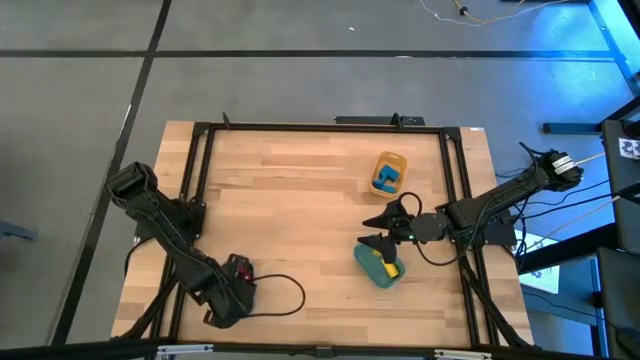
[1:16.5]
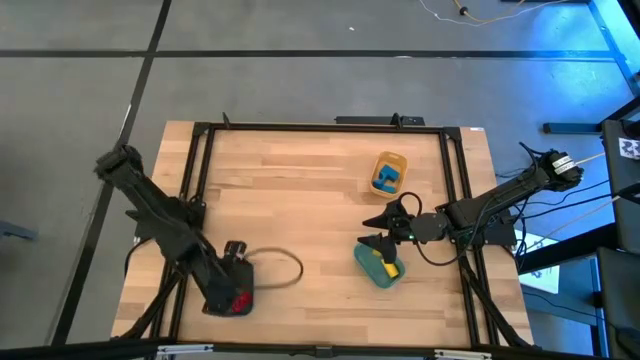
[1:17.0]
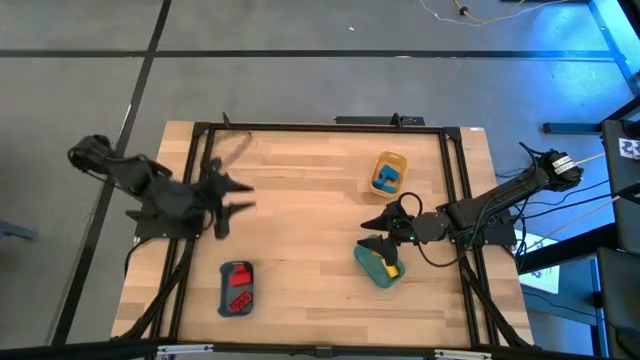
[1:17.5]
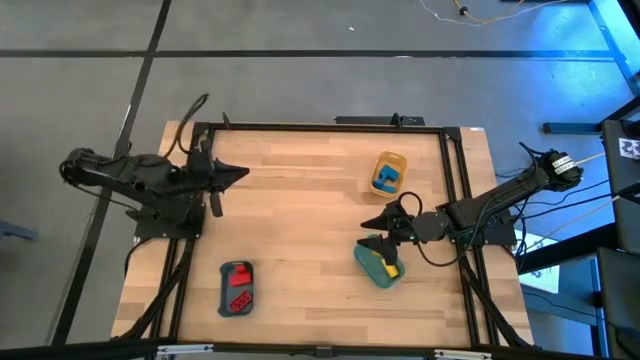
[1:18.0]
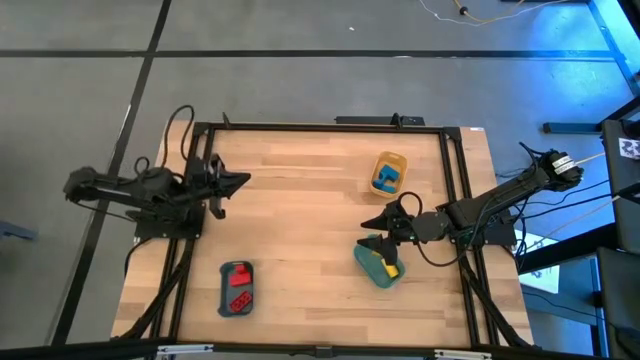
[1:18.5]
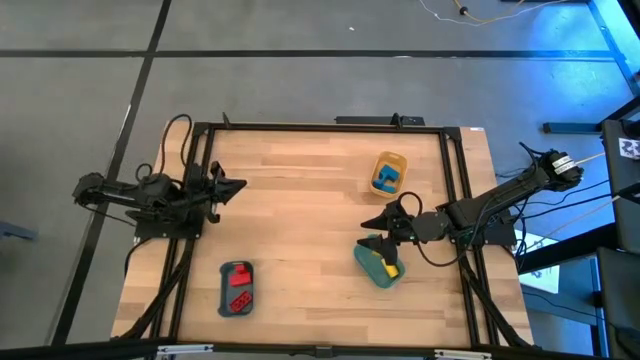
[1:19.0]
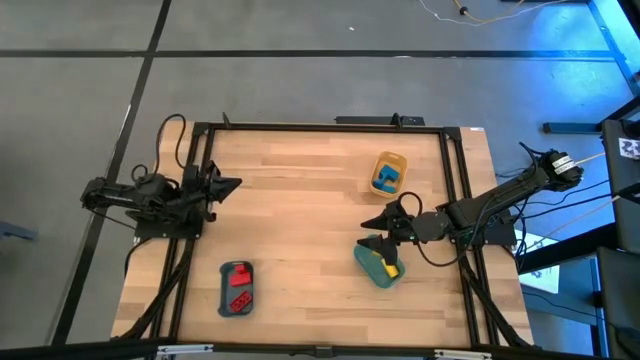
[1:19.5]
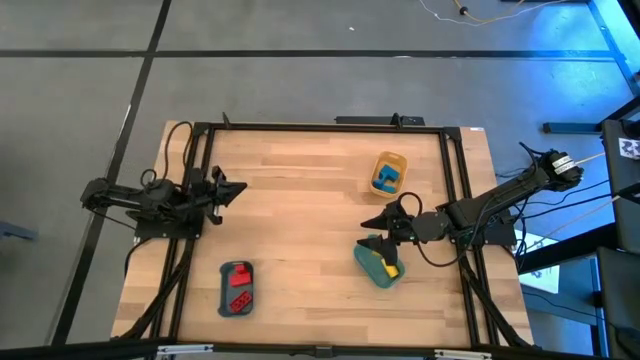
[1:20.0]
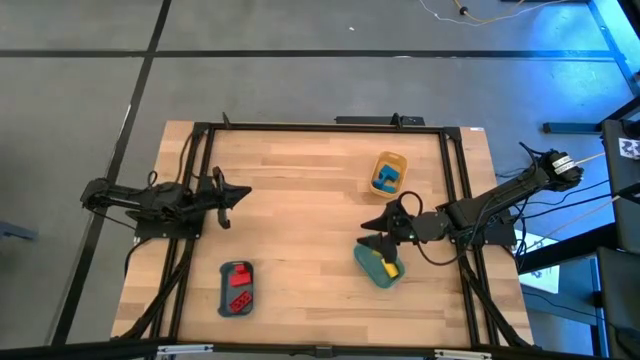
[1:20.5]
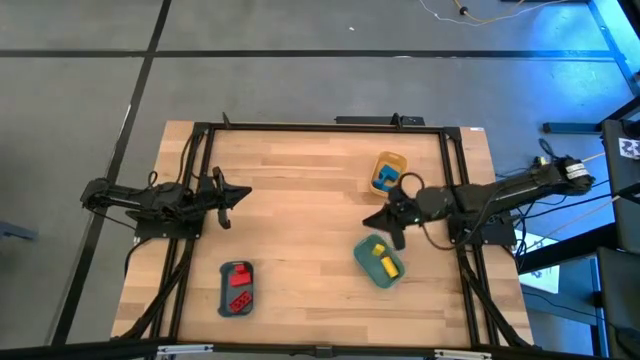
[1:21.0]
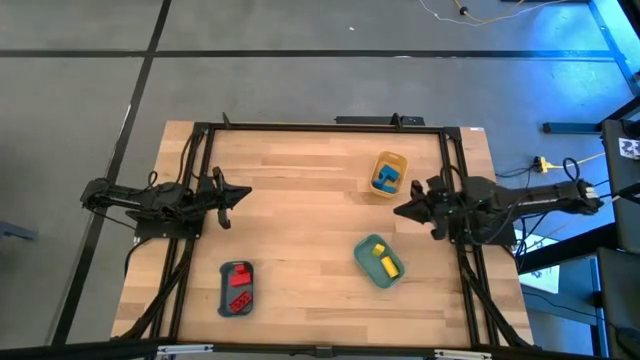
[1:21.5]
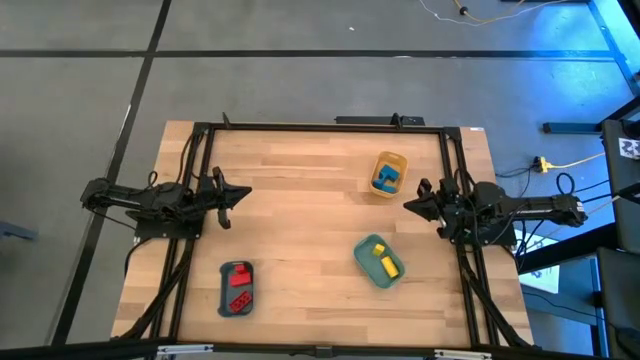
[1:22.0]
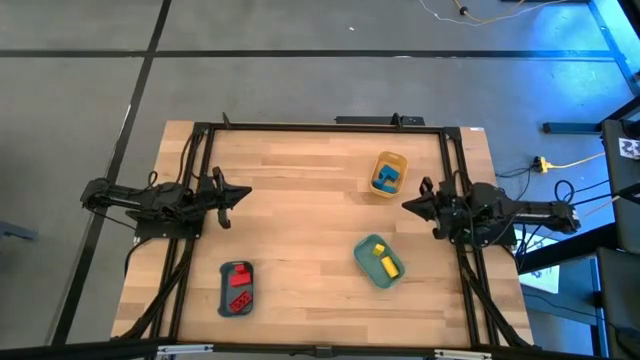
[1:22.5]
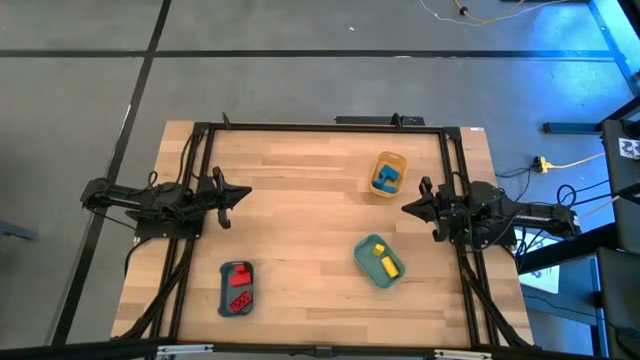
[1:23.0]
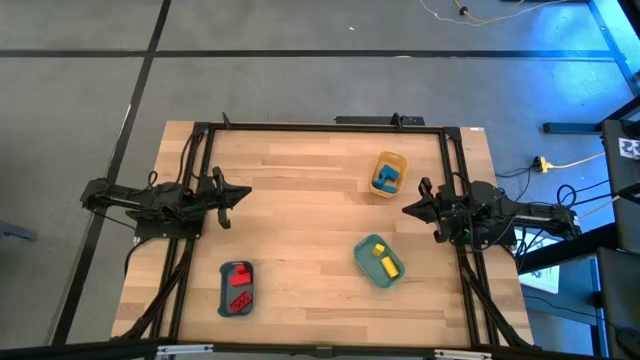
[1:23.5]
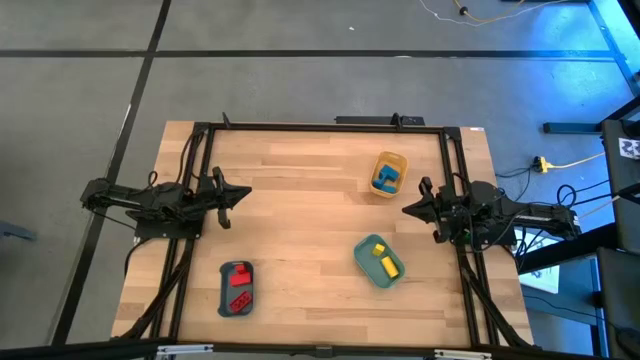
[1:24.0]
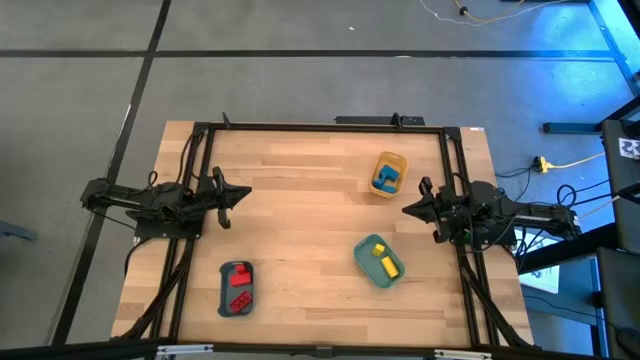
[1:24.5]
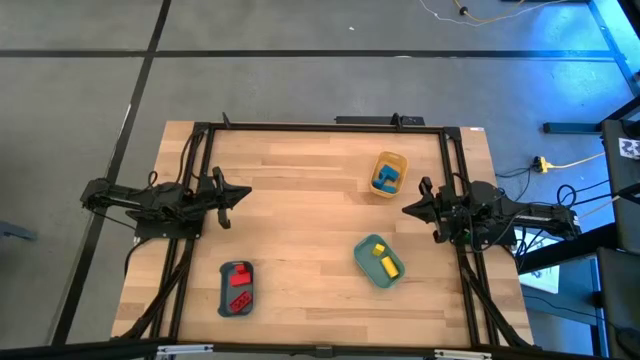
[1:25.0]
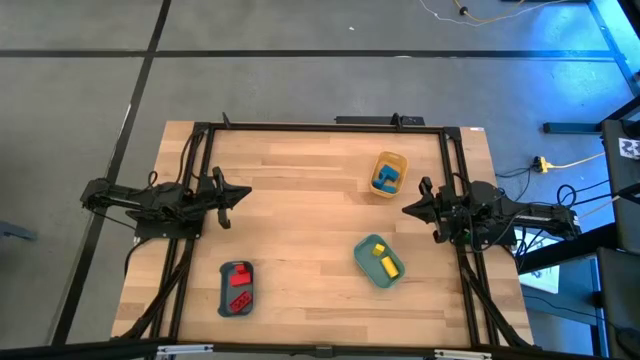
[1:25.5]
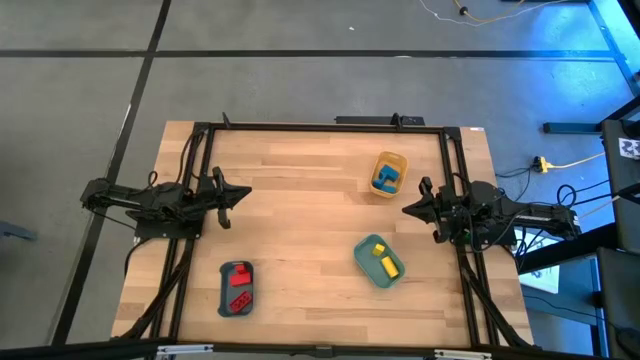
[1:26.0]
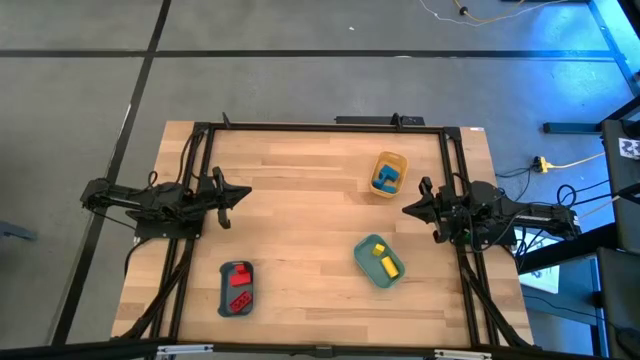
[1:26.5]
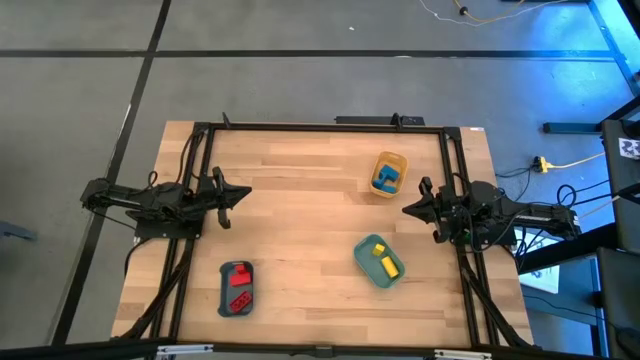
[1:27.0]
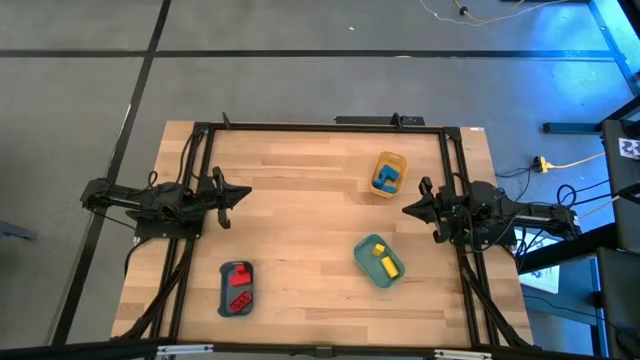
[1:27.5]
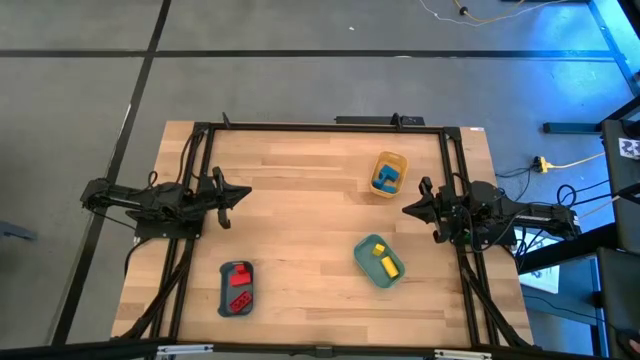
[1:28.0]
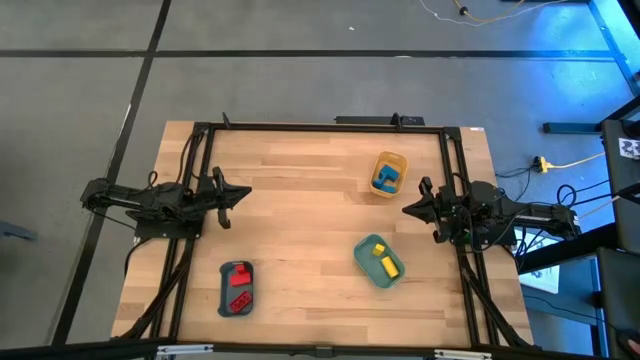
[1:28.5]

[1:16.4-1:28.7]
Task: Sort & place blocks by color
Return to Home Position

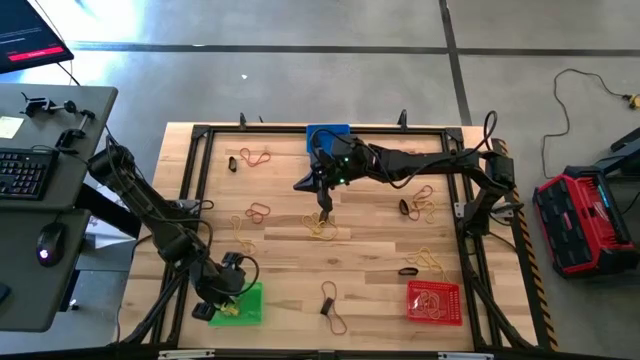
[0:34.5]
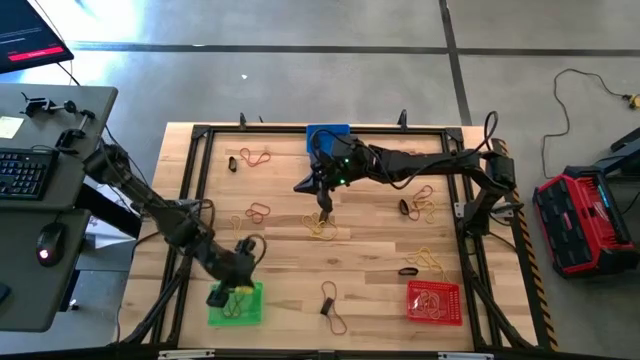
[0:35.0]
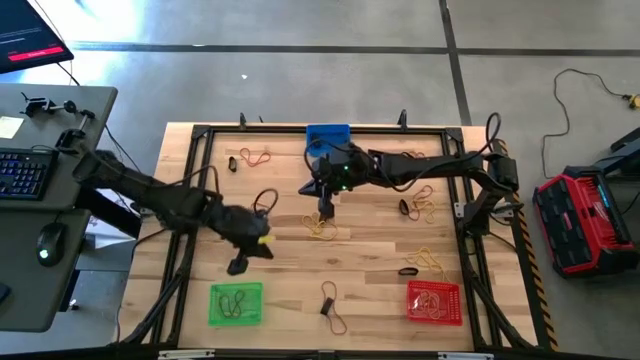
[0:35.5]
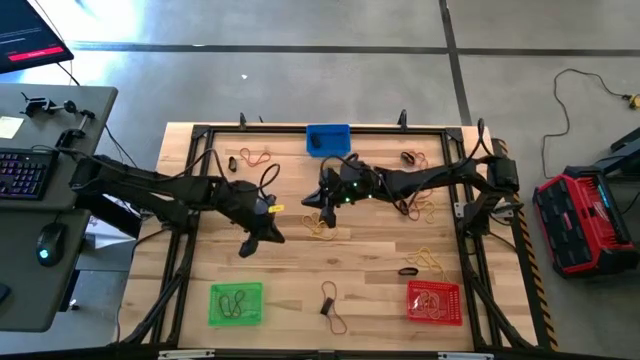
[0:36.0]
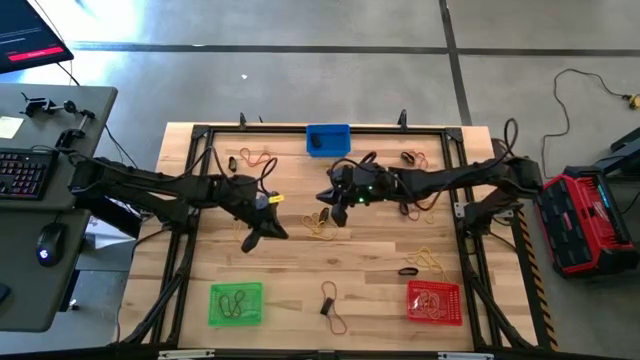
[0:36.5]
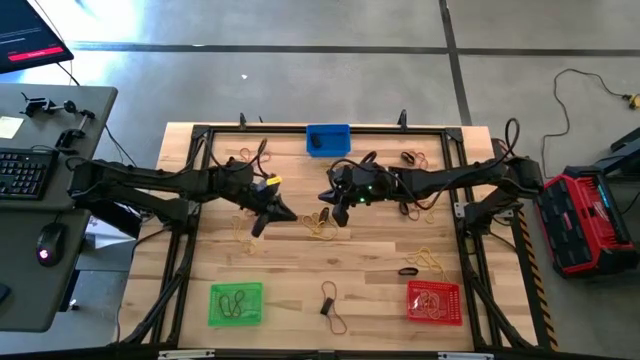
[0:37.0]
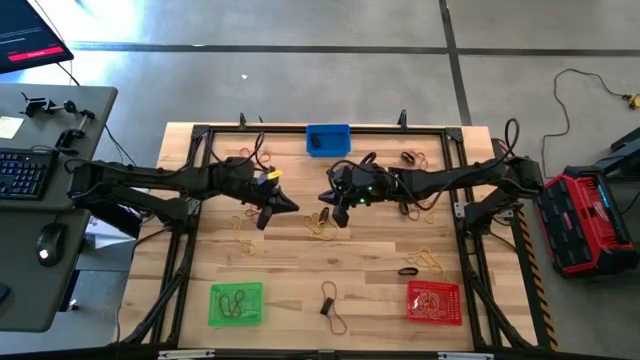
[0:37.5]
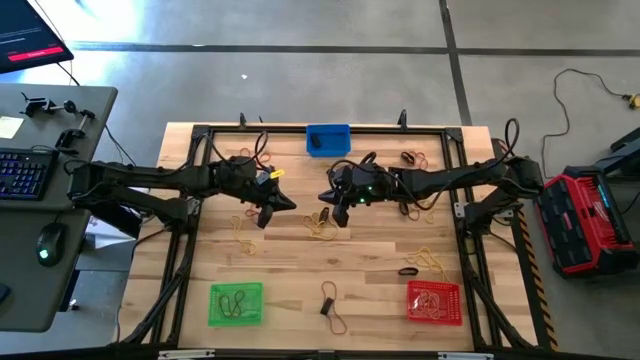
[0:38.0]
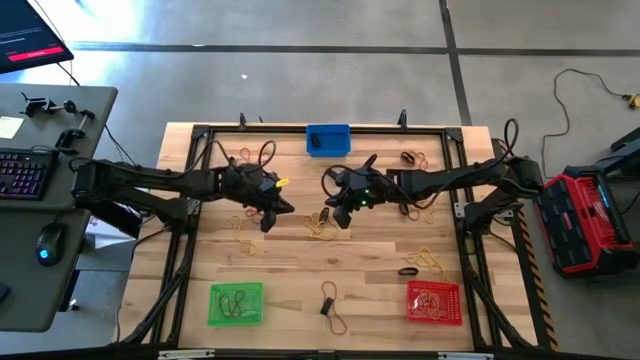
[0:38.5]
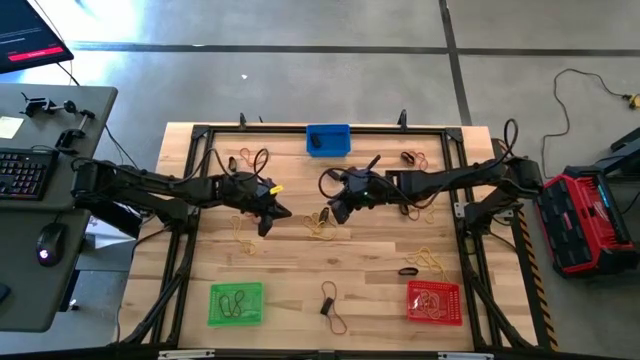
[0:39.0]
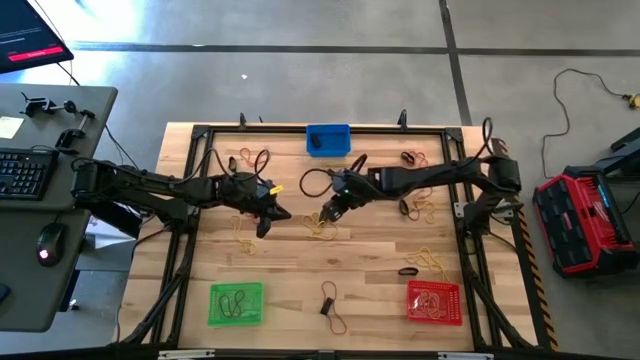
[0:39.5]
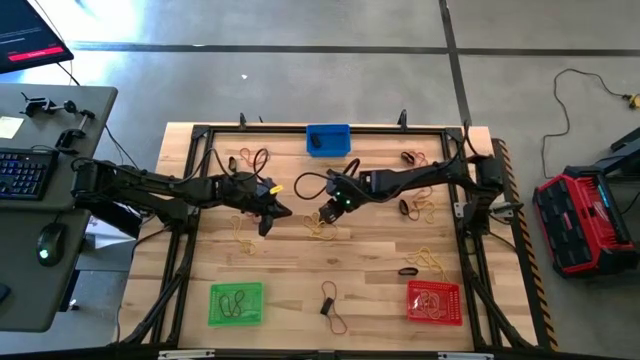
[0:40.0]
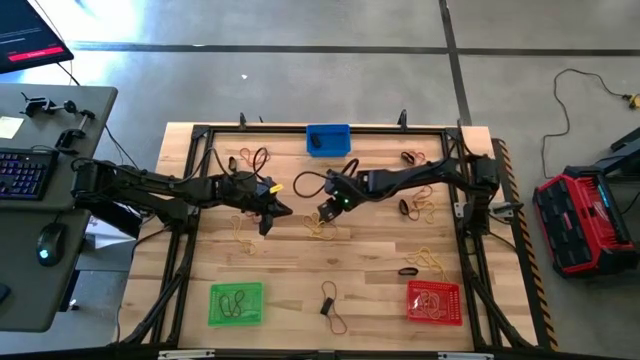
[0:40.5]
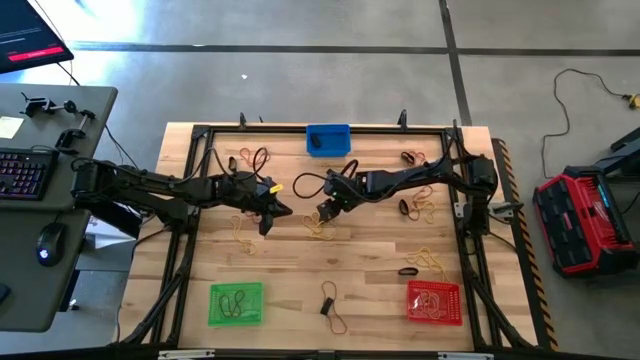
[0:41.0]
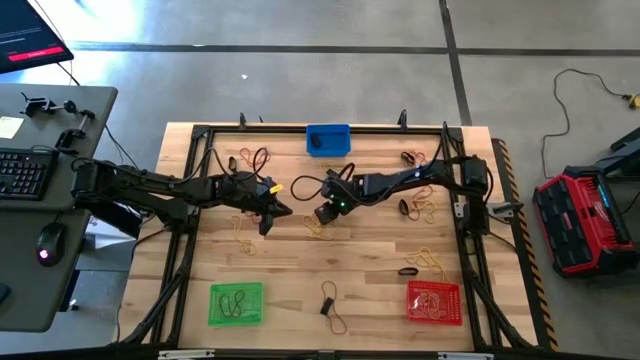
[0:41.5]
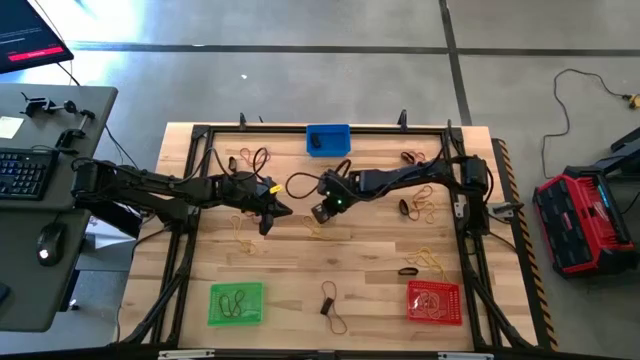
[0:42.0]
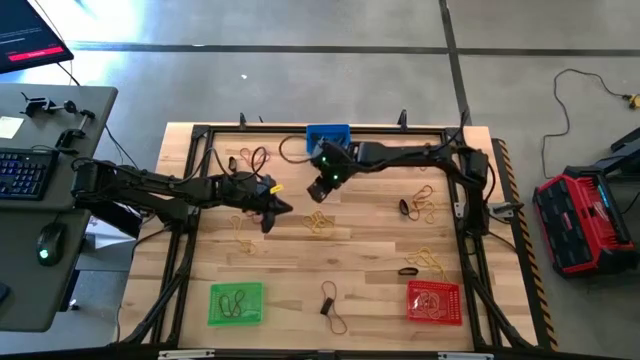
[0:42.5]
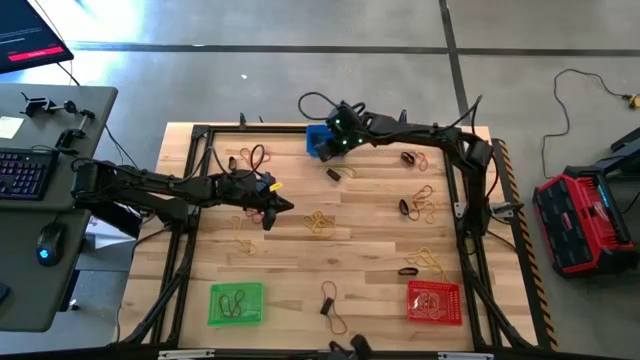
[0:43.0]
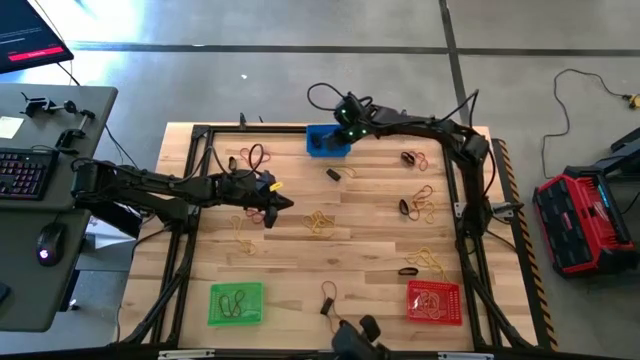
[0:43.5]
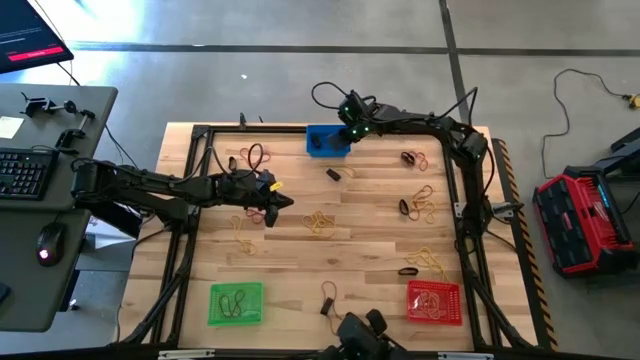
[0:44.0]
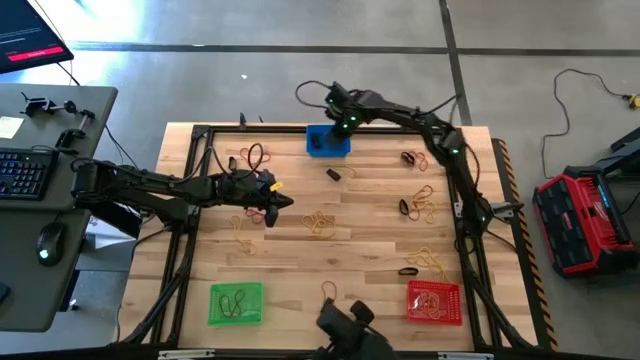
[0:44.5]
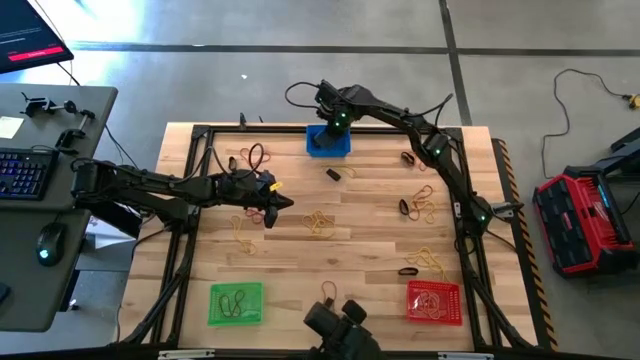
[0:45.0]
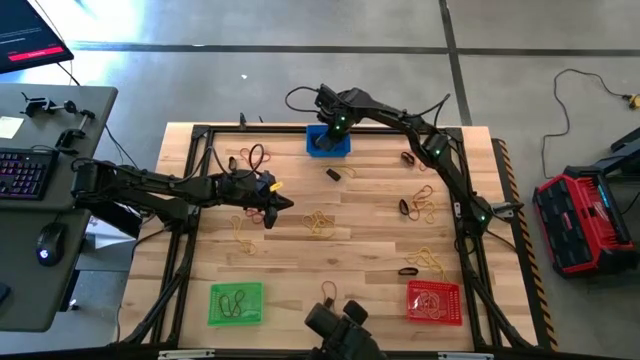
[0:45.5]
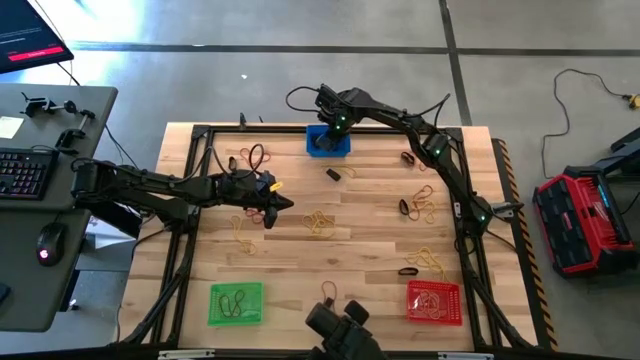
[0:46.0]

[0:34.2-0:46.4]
Task: Sort rubber bands into baskets
Put the black rubber band into the blue basket
